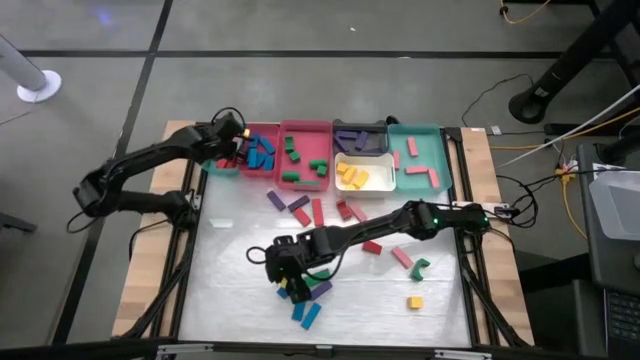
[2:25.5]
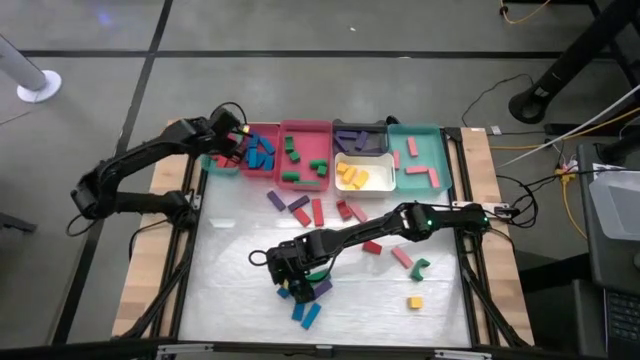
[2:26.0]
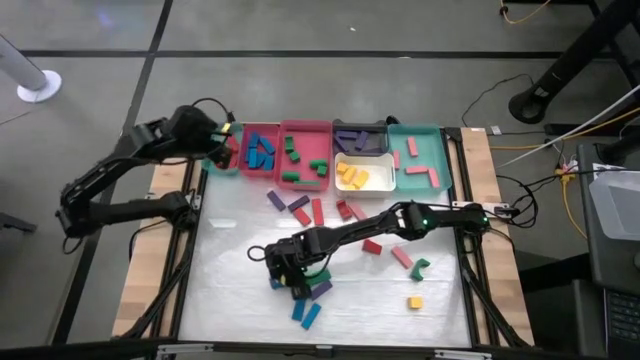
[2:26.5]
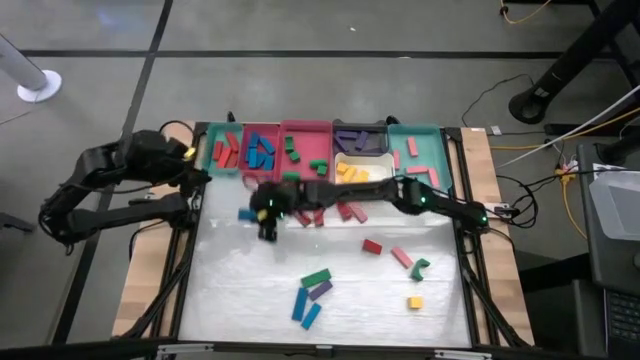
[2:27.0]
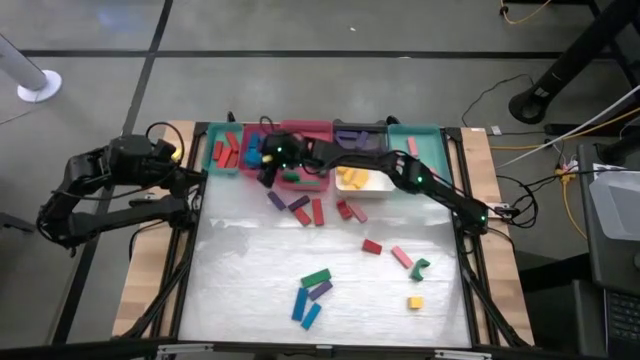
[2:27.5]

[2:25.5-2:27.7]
Task: Sort blocks
Put the blue block into the left pink bin

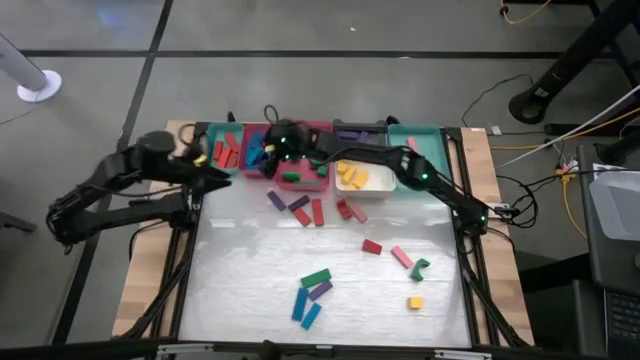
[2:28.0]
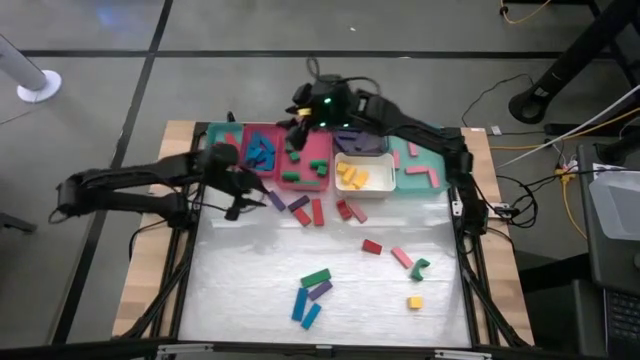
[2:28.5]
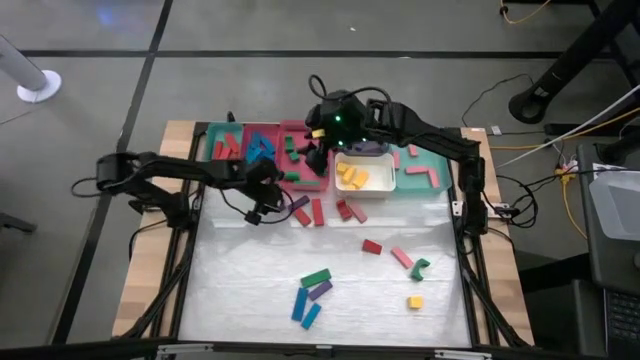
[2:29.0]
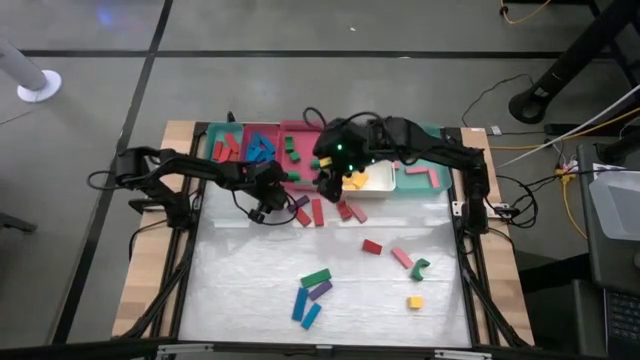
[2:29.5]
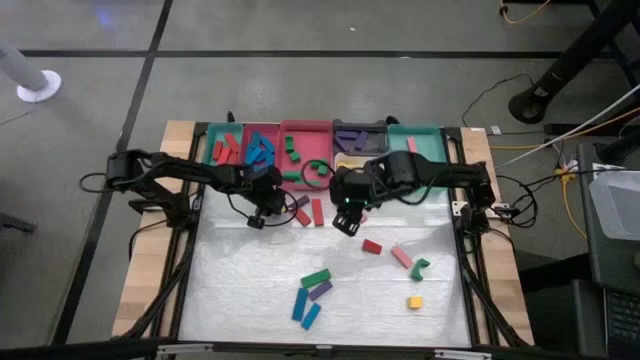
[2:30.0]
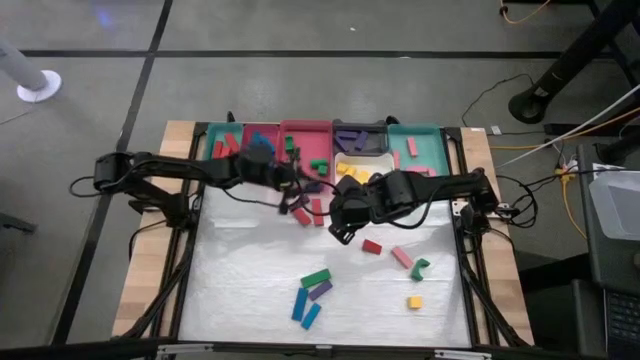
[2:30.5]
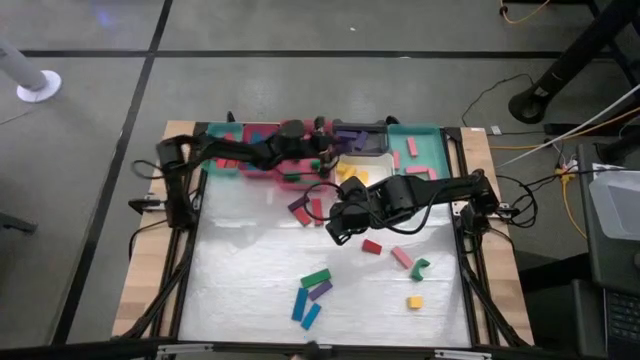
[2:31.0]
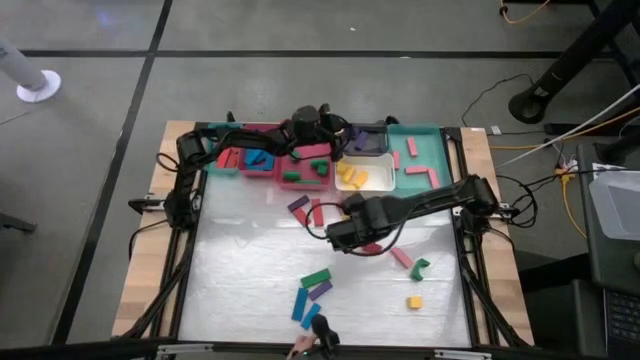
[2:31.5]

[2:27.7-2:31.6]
Put the violet block into the black bin

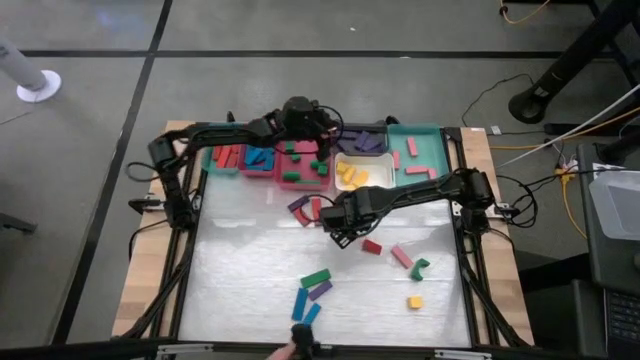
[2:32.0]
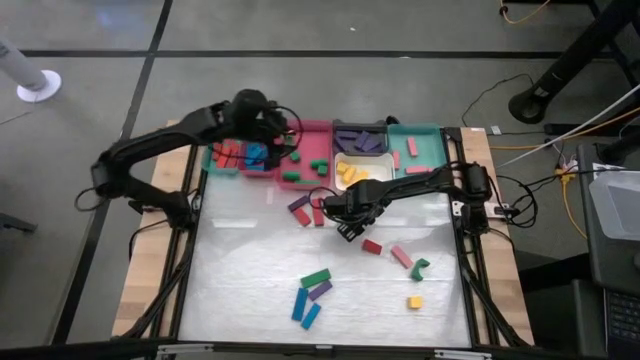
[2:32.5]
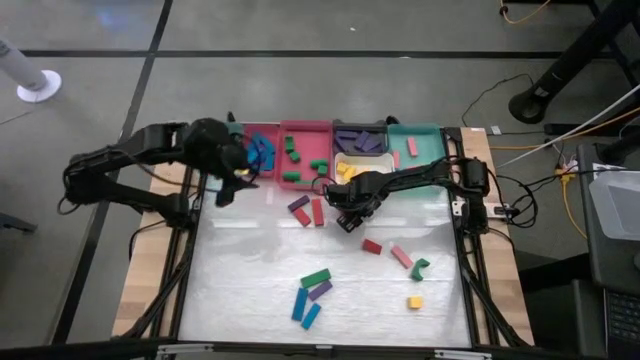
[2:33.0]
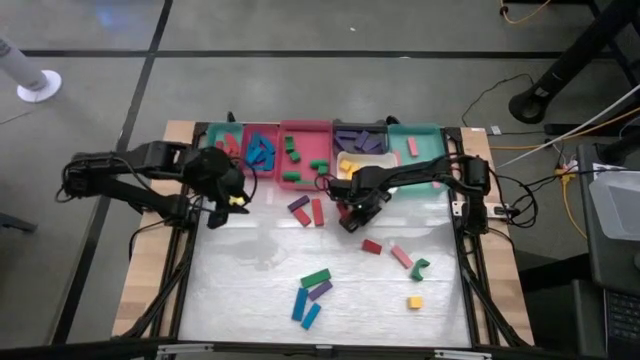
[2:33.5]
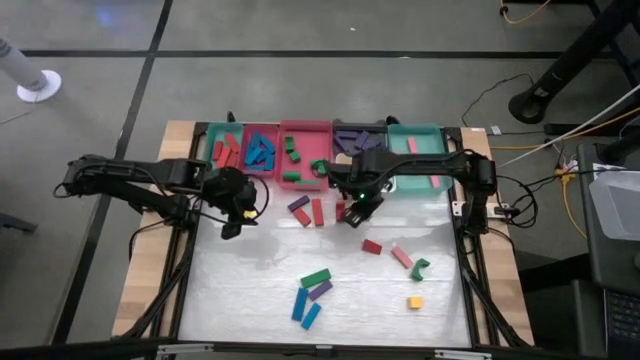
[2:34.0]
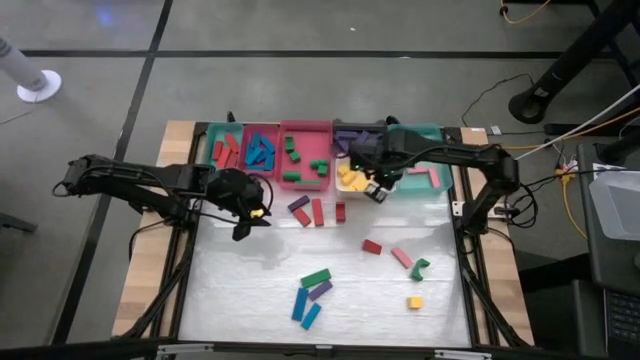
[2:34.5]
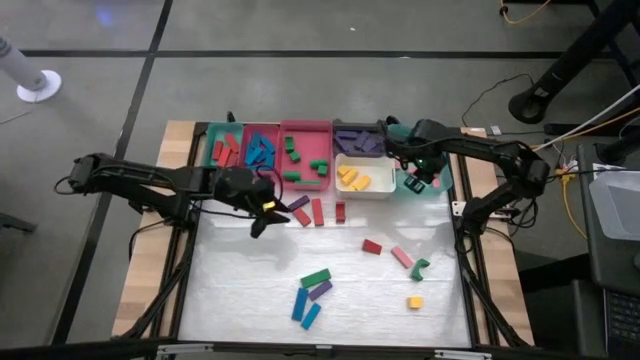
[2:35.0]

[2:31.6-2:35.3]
Put the pink block into the right green bin

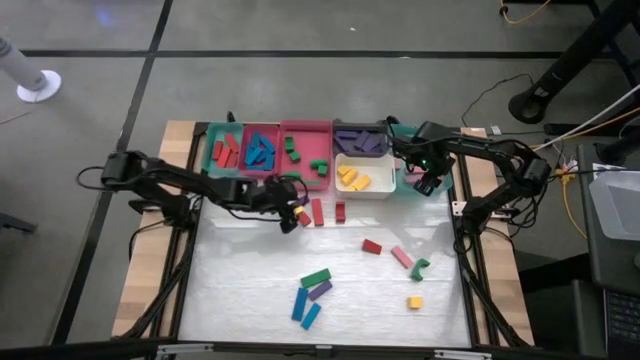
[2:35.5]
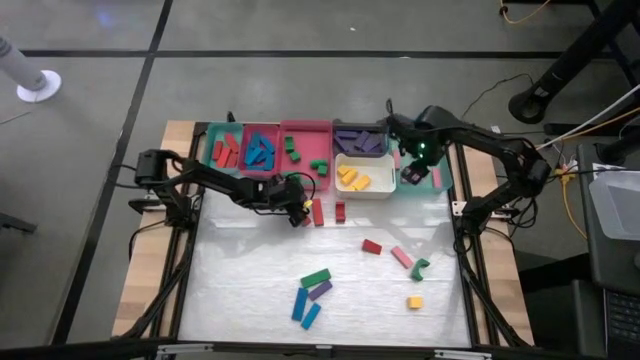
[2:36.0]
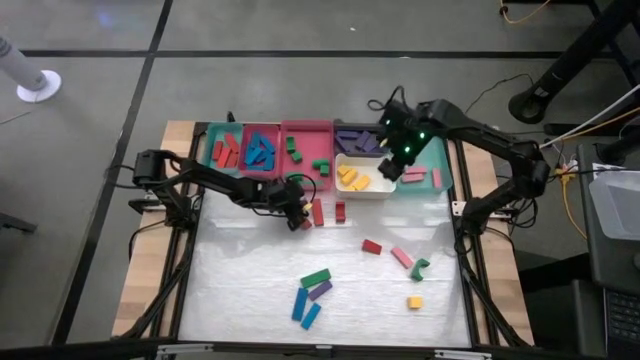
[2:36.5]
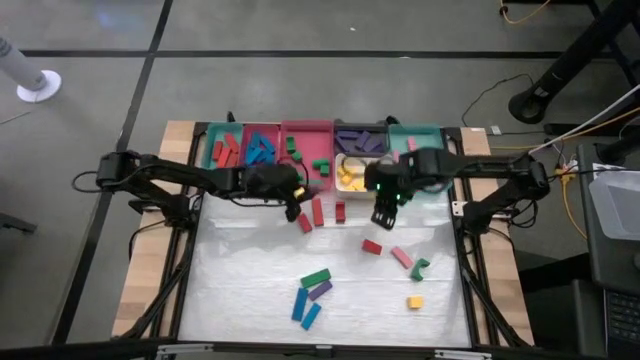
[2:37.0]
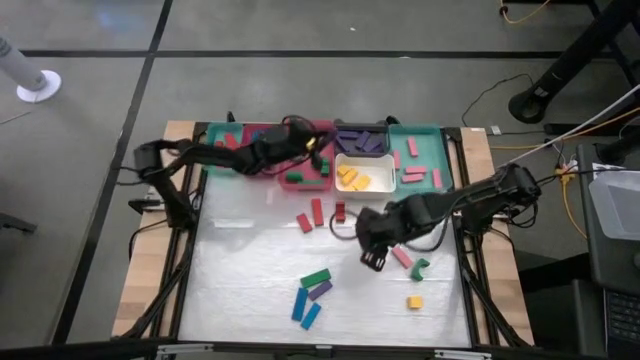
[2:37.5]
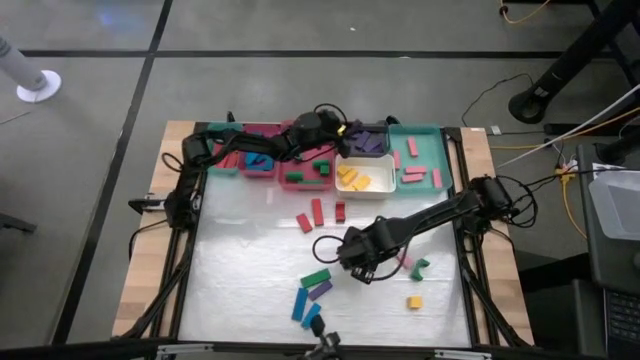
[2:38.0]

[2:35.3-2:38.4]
Put the violet block into the black bin

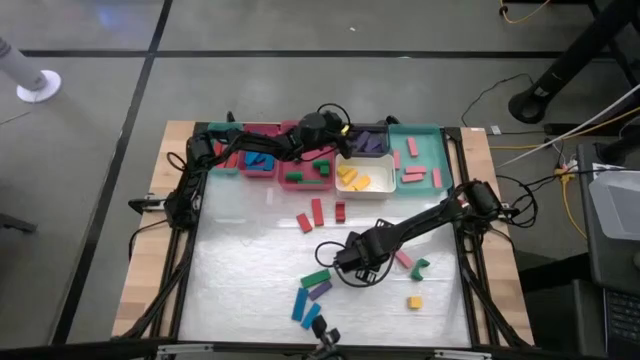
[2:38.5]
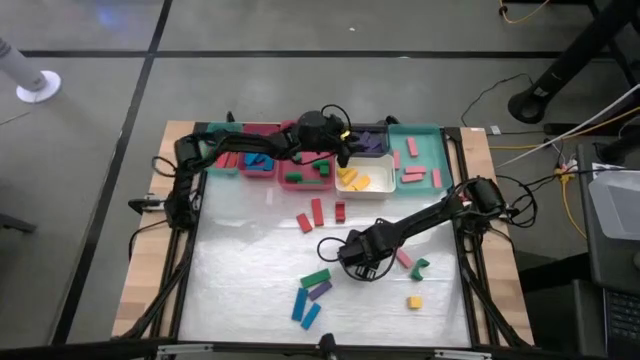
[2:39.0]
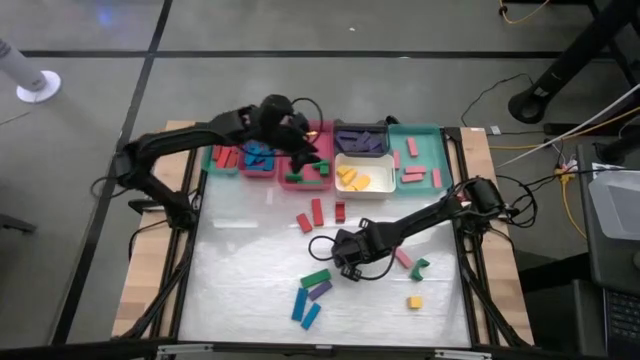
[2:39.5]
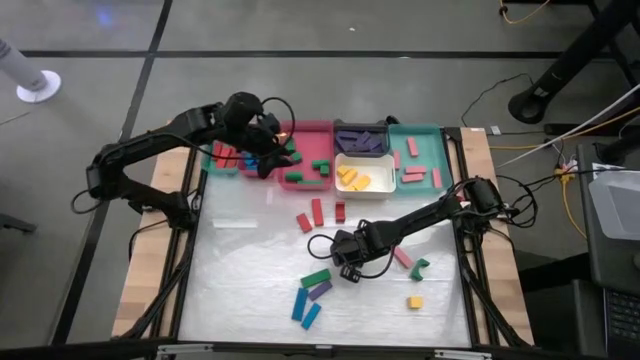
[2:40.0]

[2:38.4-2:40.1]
Put the red block into the left green bin

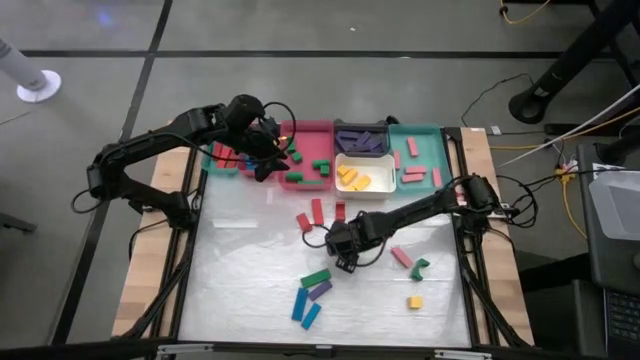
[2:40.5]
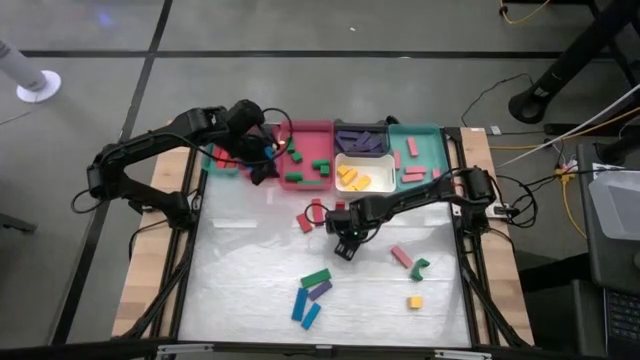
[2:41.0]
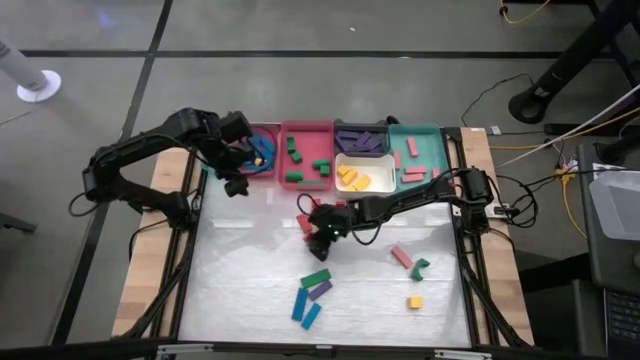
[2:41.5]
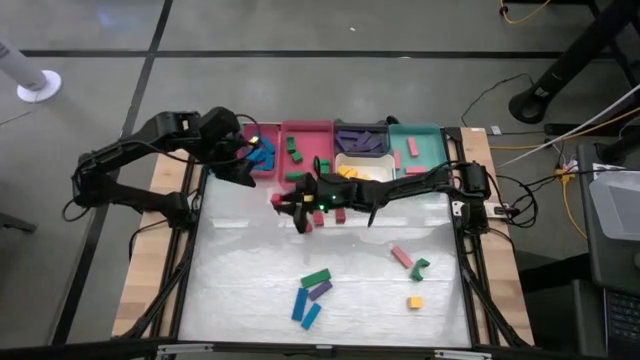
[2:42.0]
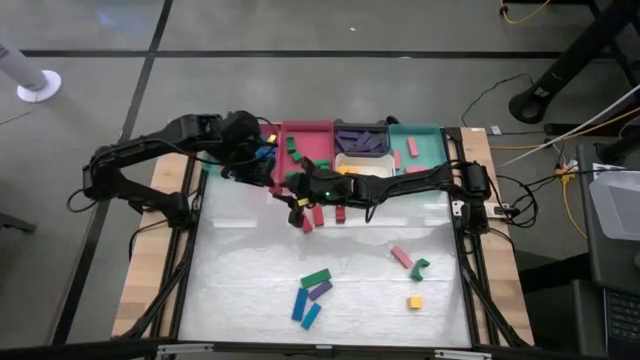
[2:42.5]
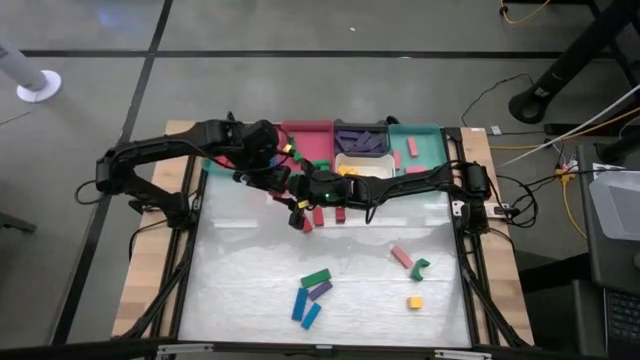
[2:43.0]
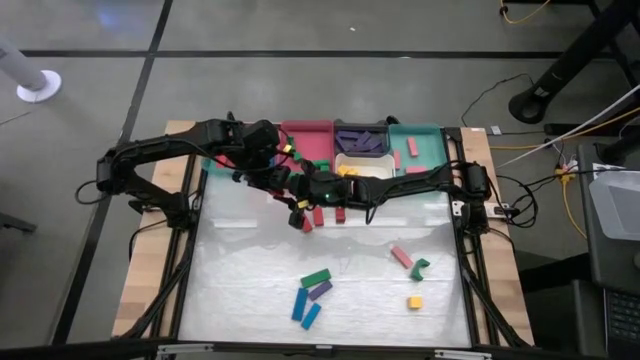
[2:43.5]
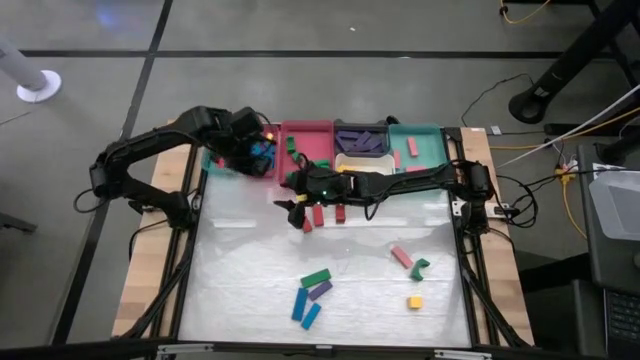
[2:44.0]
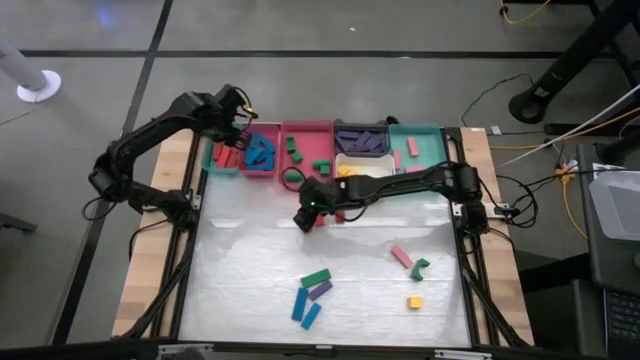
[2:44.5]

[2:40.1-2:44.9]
Put the red block into the left green bin
